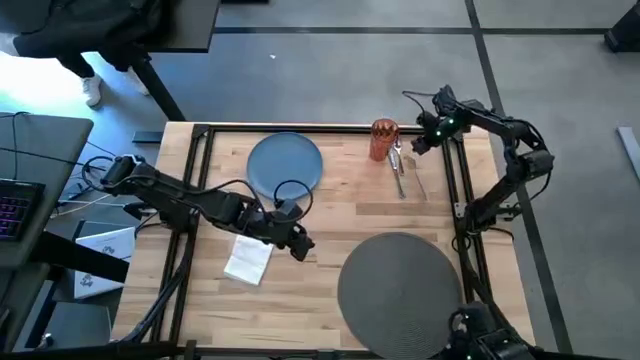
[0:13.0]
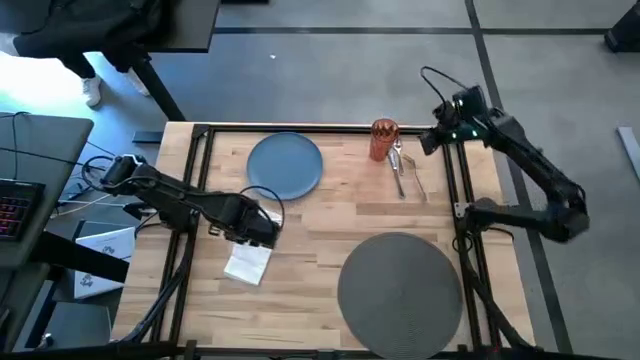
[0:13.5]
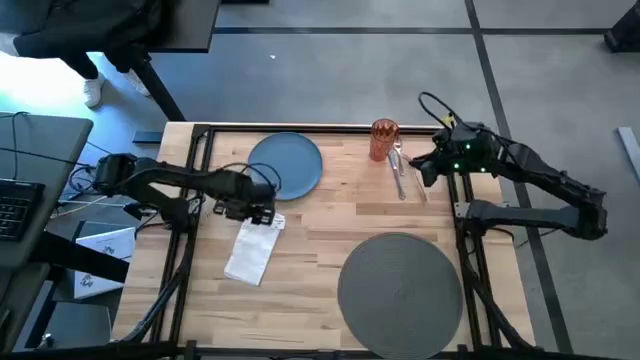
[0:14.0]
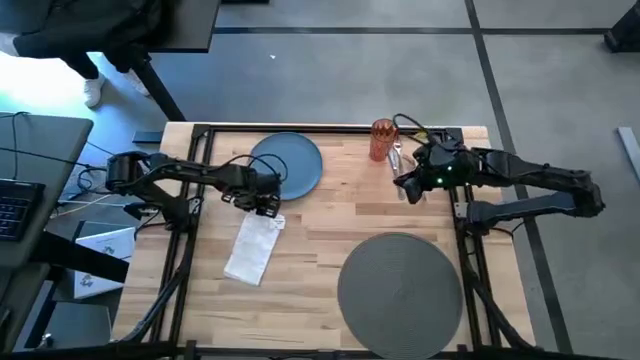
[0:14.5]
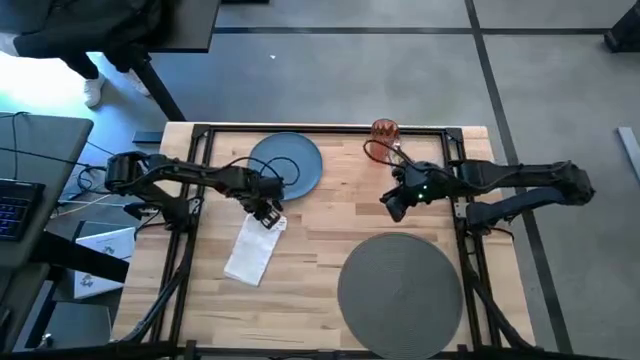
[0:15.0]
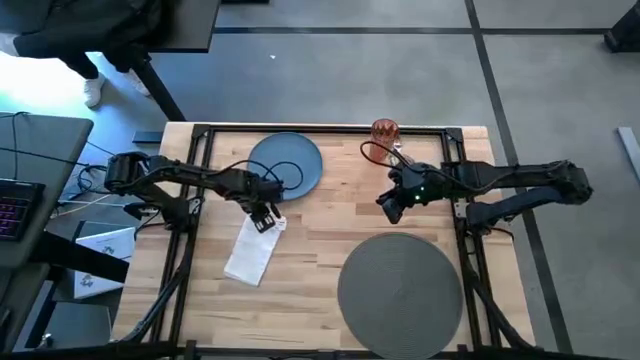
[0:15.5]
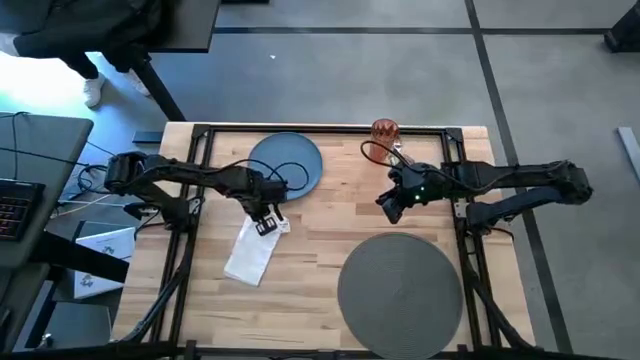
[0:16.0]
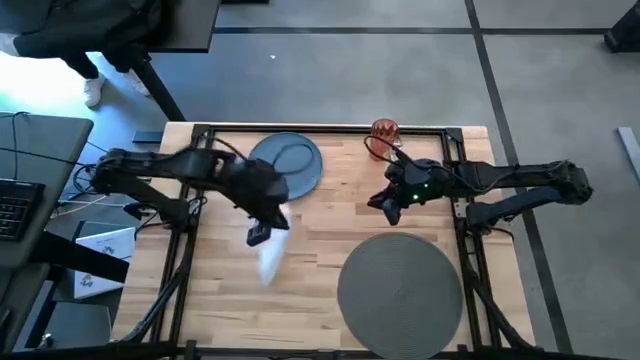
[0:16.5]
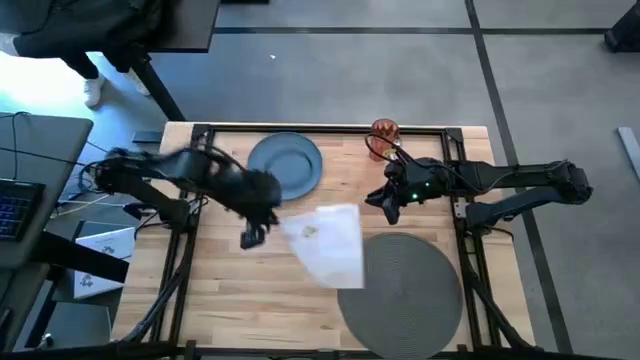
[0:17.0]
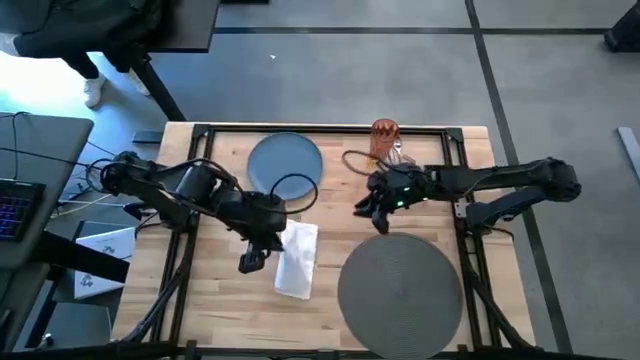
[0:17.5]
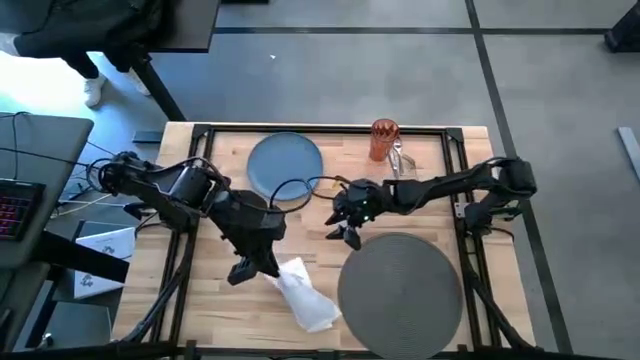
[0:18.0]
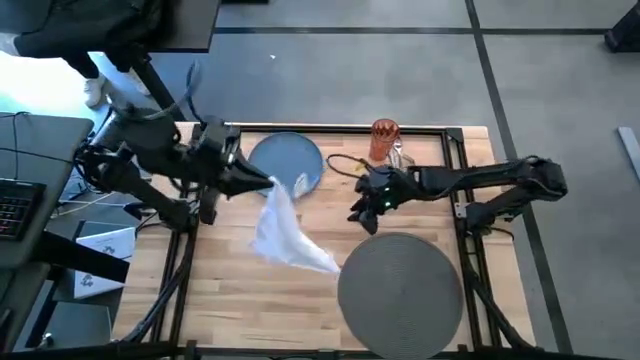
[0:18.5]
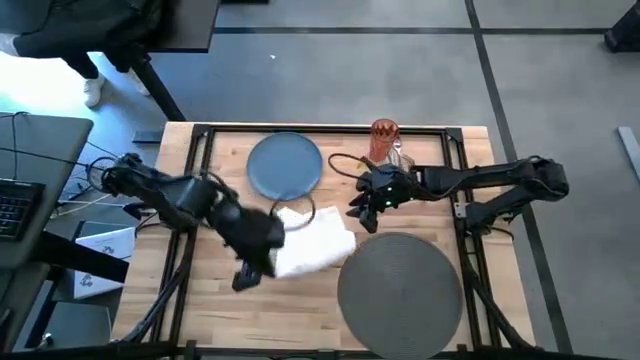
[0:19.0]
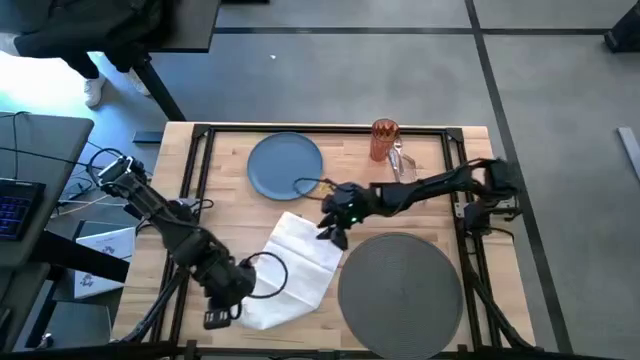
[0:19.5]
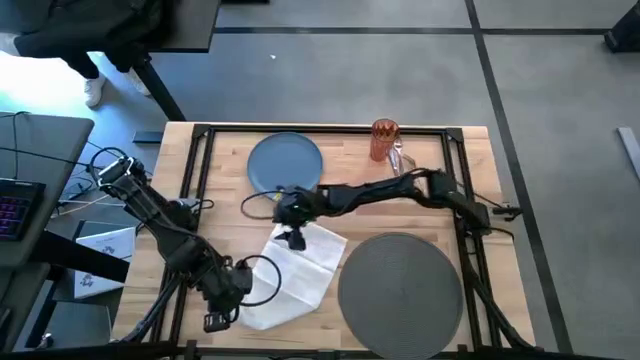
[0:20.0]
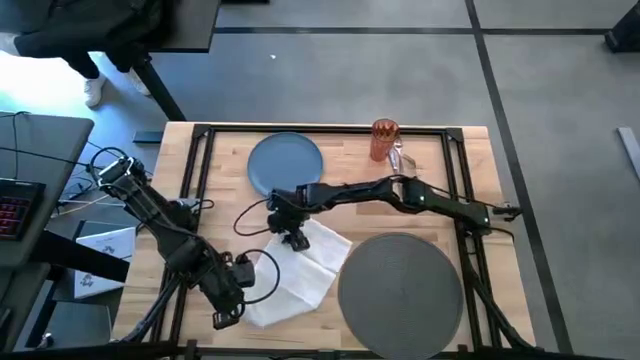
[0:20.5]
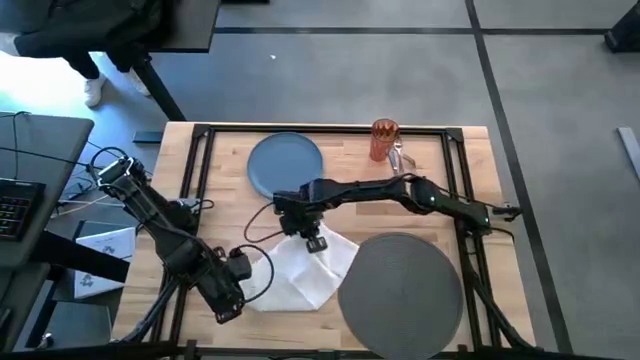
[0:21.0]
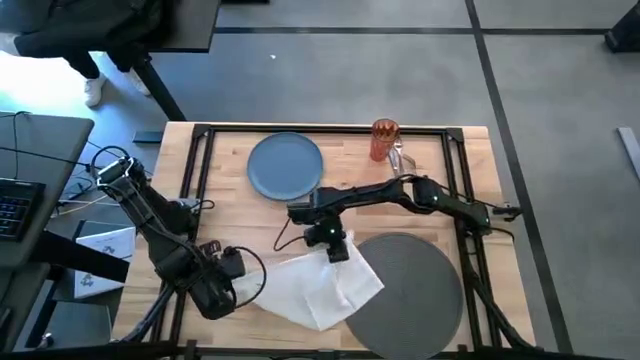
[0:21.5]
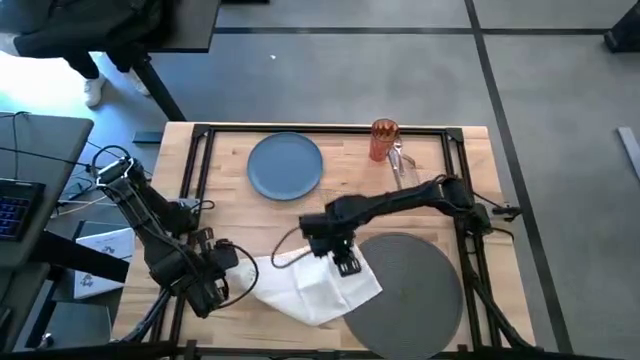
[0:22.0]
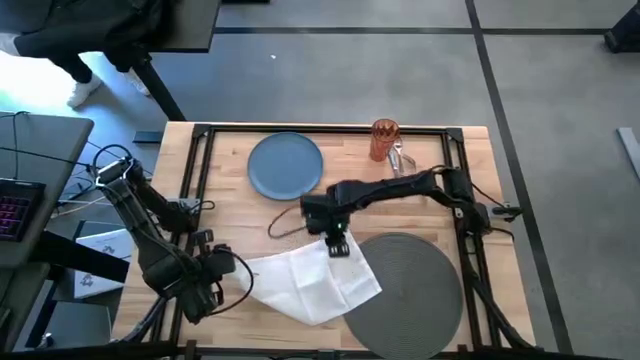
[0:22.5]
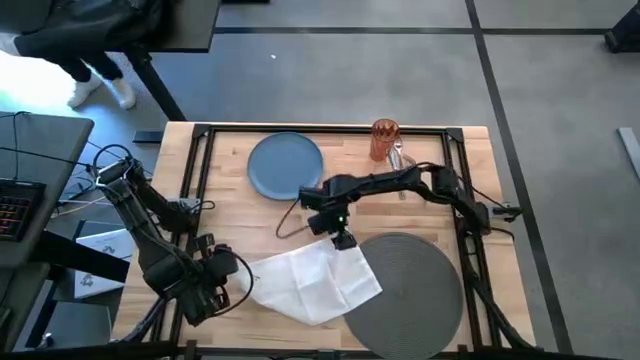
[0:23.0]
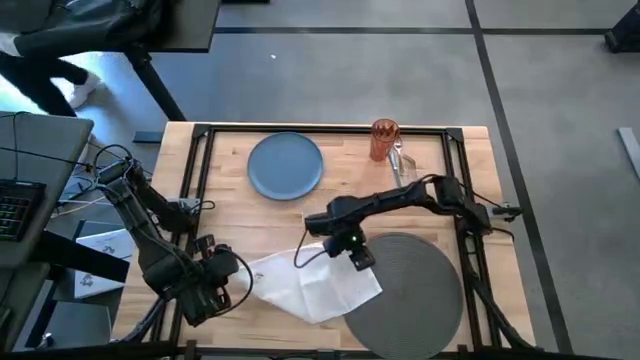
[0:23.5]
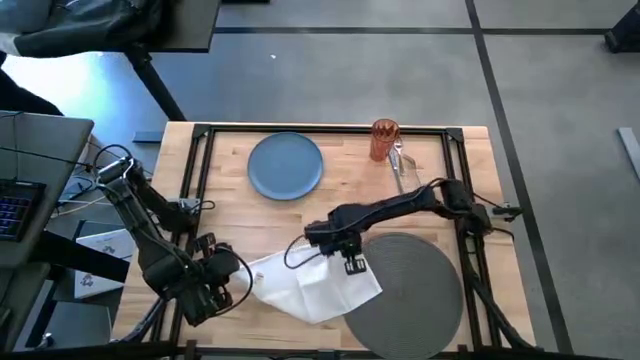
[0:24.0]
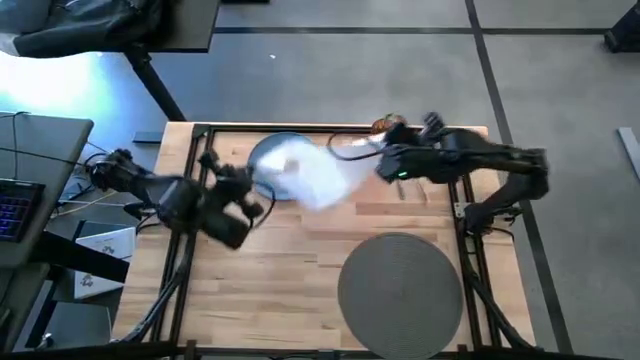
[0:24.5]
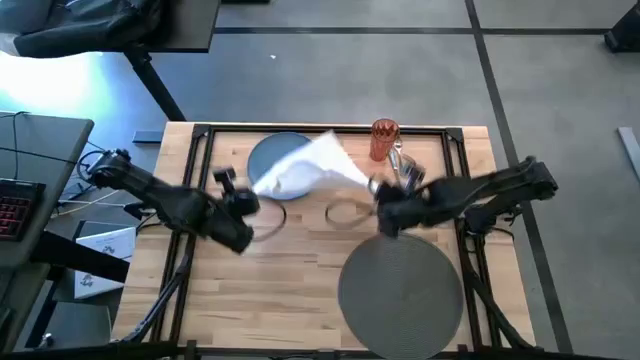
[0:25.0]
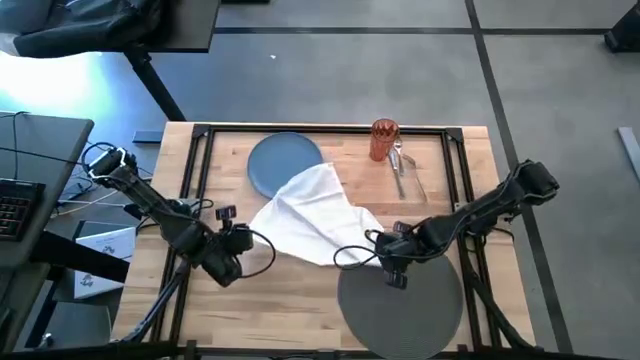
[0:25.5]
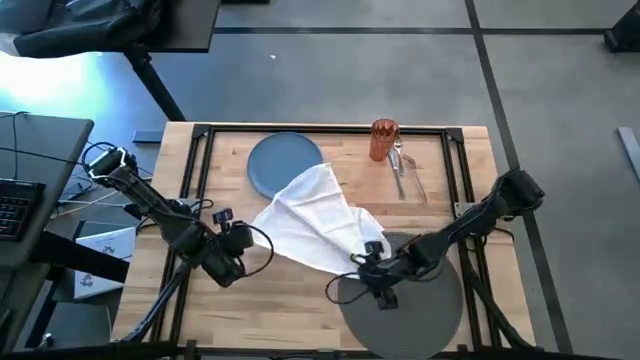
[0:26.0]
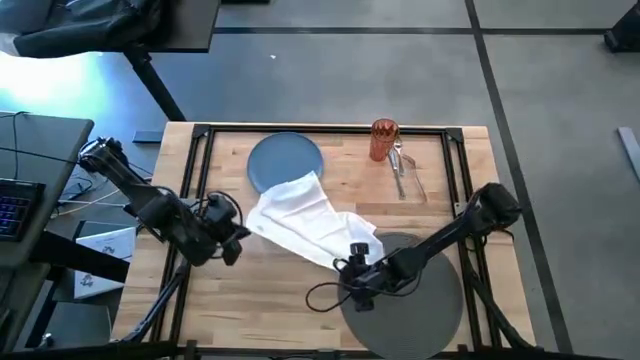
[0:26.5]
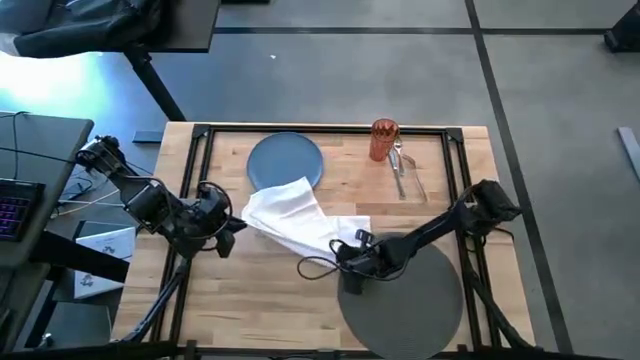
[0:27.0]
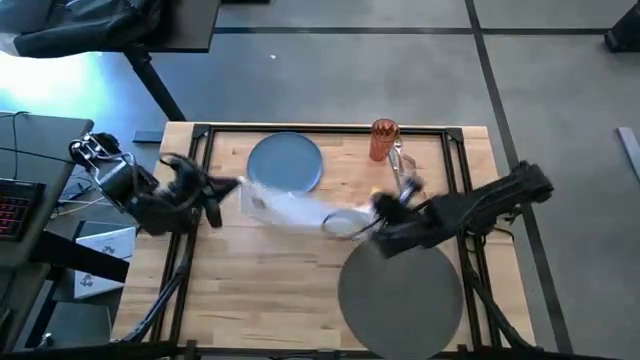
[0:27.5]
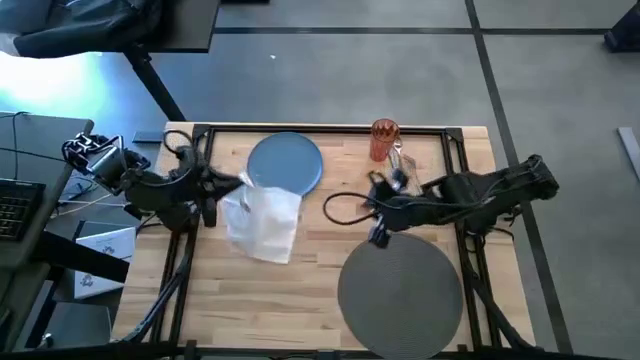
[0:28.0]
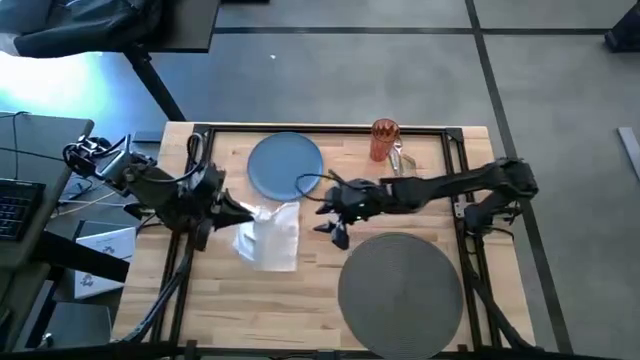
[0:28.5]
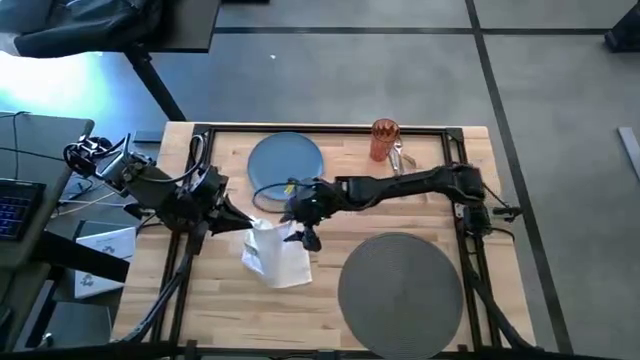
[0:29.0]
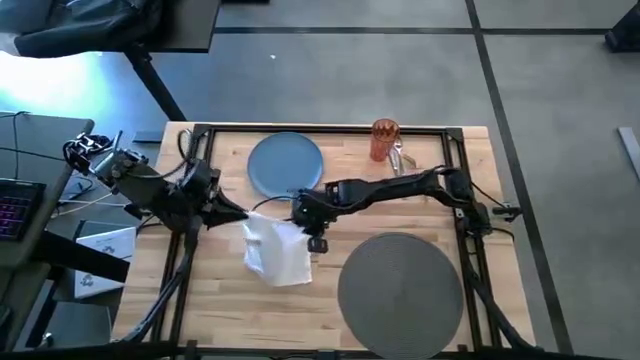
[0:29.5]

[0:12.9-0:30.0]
Task: Set table place
Fold the white table napkin
